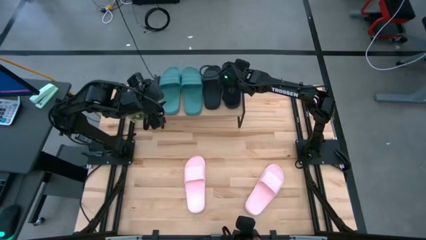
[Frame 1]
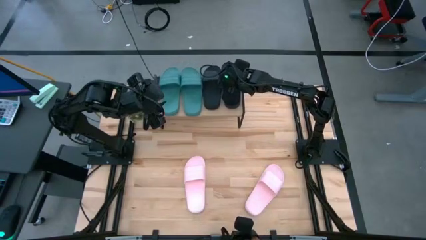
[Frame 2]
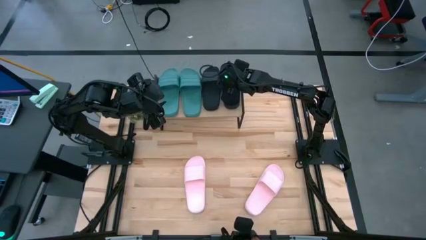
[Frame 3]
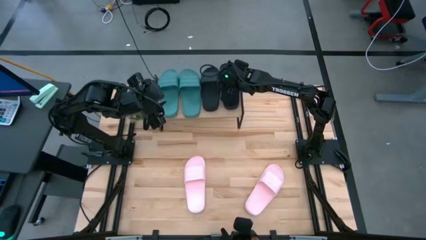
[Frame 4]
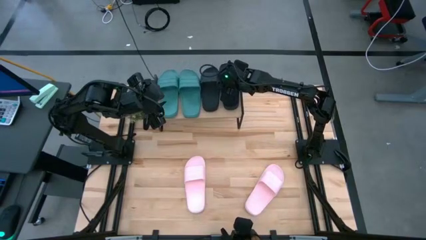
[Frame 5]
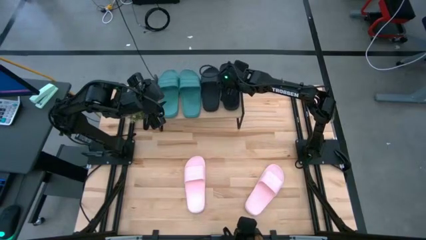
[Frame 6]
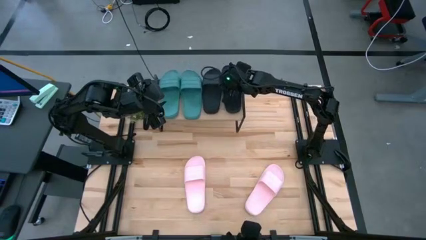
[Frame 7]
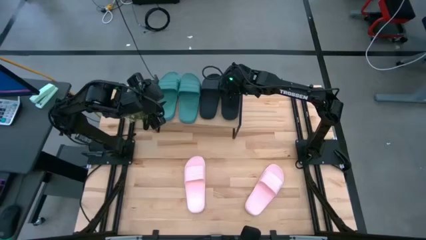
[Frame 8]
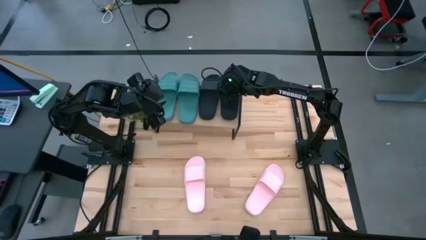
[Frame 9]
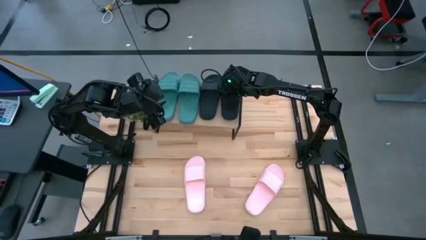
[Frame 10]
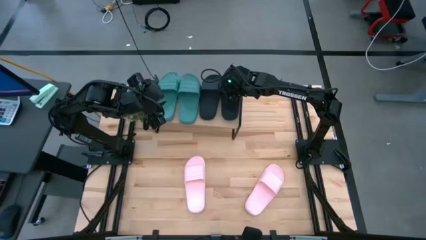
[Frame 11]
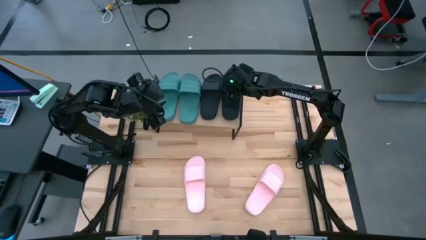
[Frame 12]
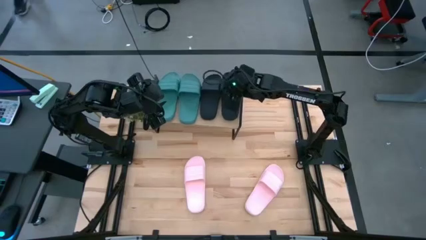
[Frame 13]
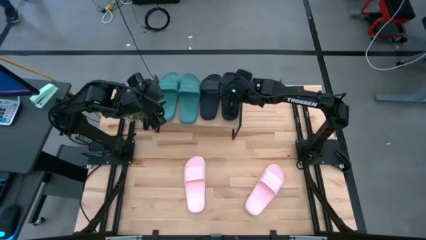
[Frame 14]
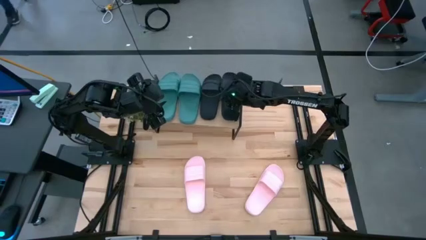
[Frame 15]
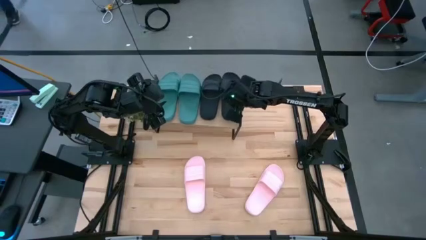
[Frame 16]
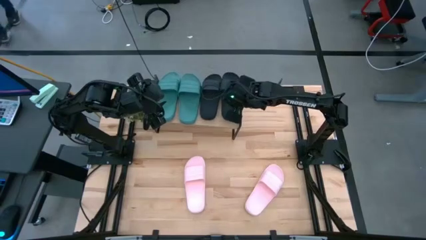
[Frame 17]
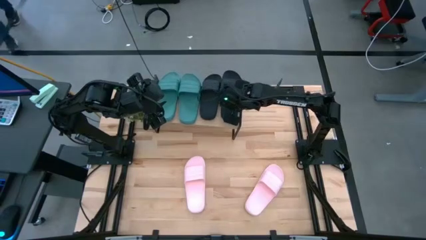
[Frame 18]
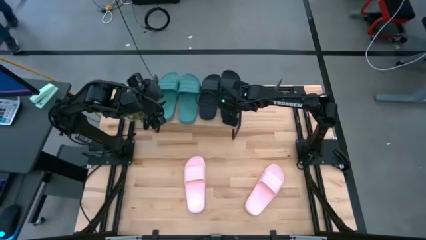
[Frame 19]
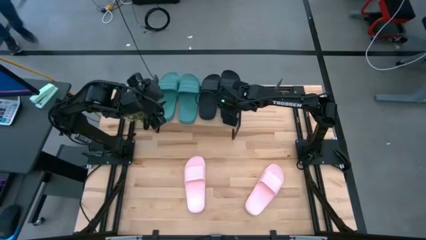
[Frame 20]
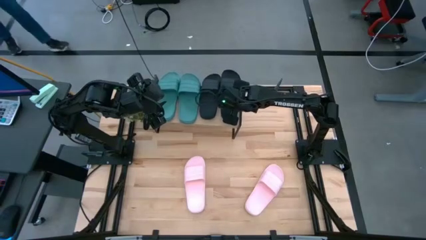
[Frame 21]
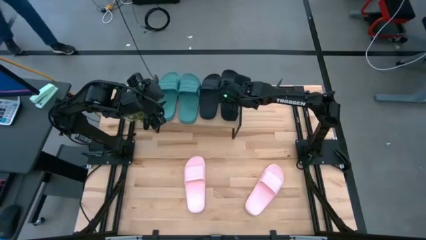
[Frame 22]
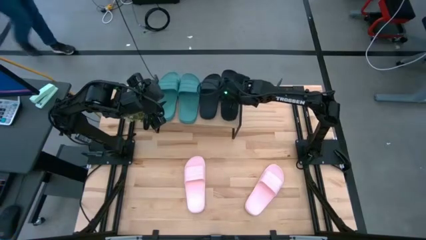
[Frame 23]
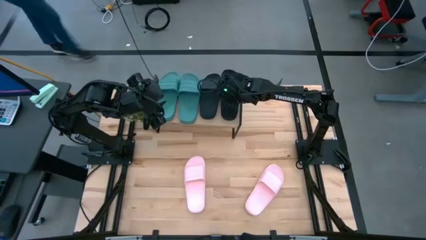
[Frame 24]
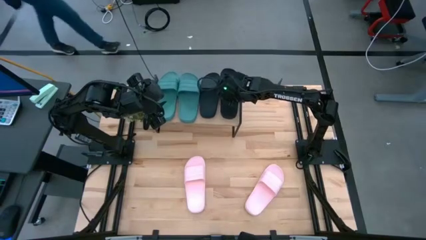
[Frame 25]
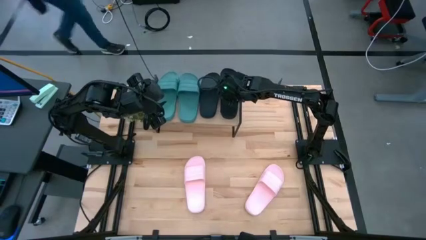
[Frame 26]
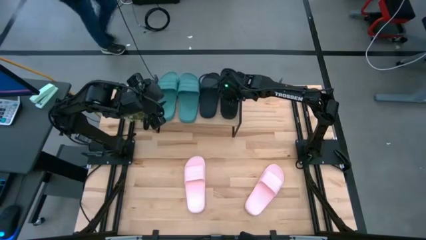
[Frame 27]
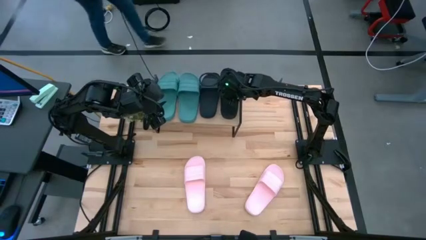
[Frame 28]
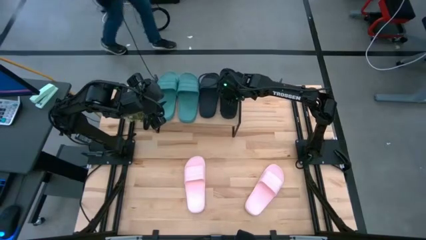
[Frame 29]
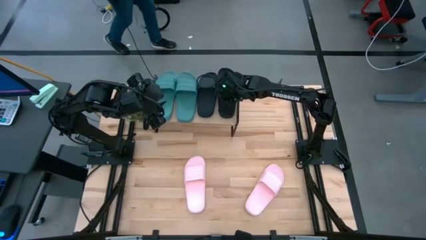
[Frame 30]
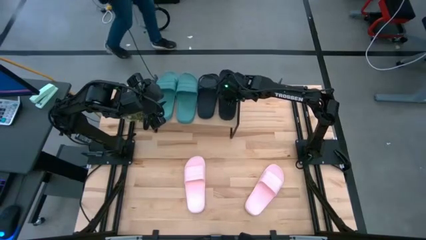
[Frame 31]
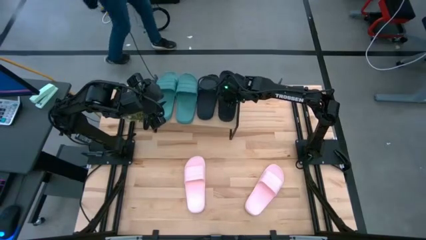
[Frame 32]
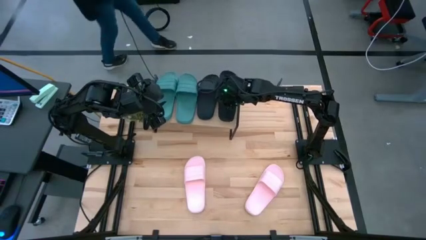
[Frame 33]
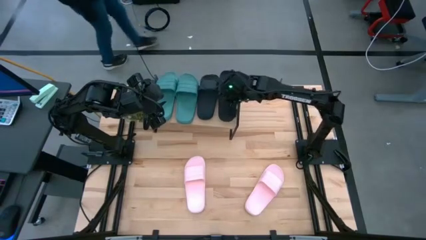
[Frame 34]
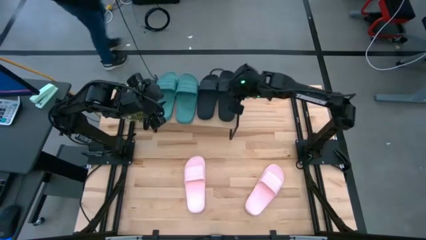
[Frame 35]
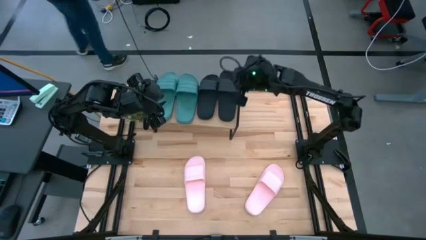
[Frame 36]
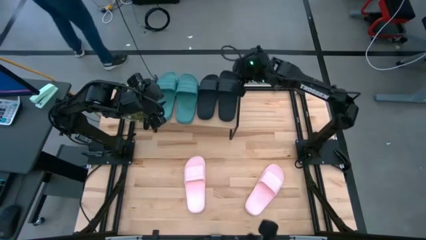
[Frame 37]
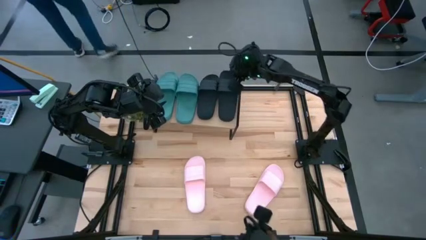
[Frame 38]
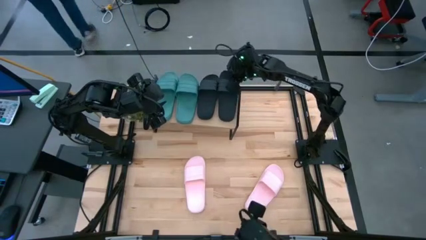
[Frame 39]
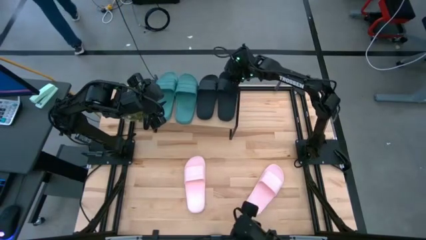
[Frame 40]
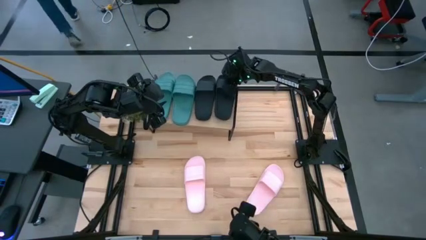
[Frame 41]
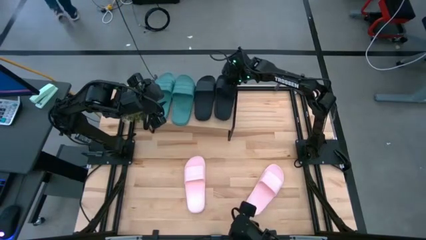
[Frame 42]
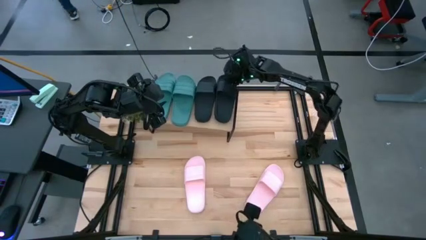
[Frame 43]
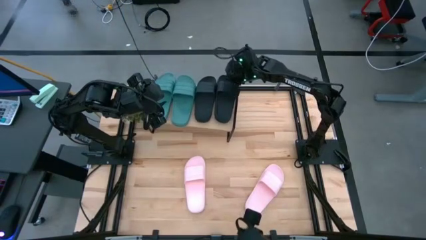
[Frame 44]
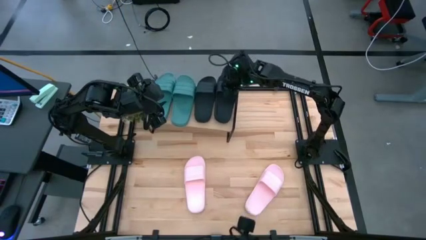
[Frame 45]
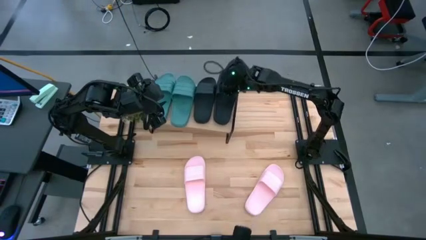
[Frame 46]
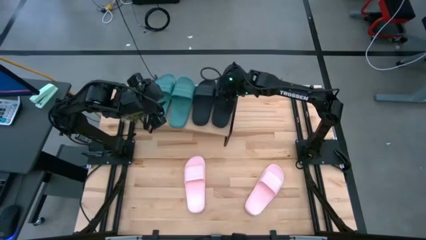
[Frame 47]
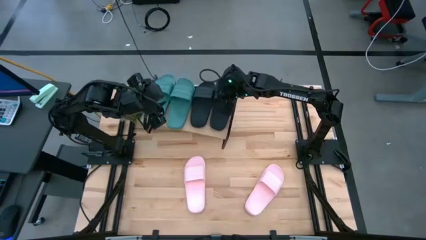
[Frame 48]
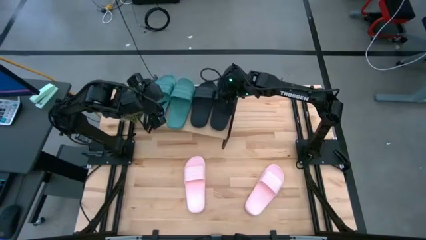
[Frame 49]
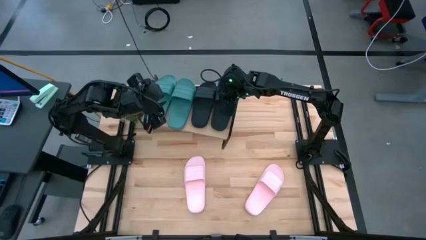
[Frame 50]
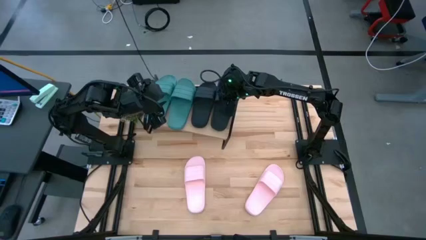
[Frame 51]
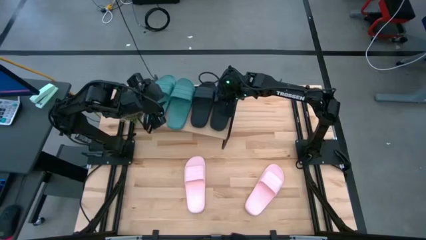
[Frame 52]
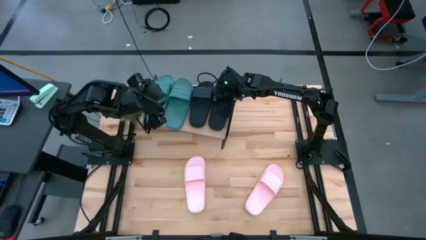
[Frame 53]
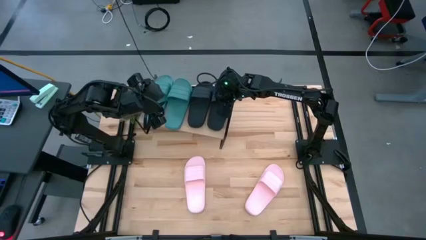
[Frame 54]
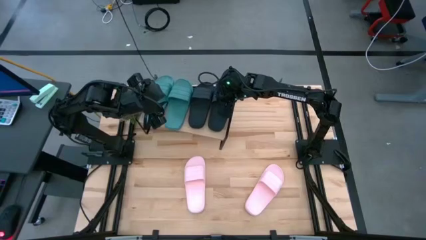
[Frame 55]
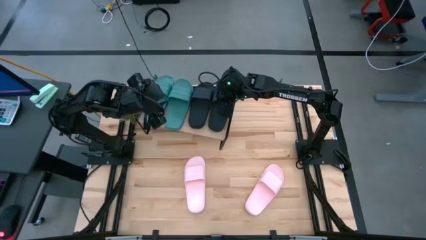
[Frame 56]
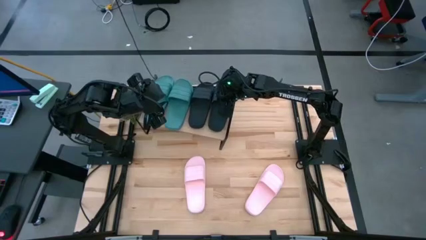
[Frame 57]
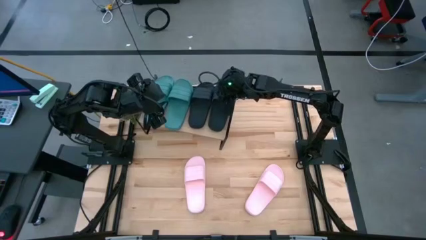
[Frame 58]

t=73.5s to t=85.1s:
Task: Pick and place slides into the shelf
Put the black slide on the shelf

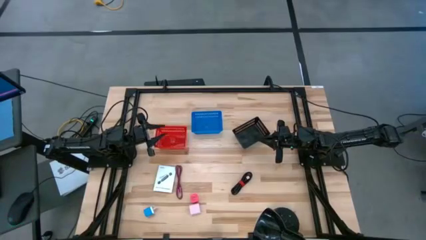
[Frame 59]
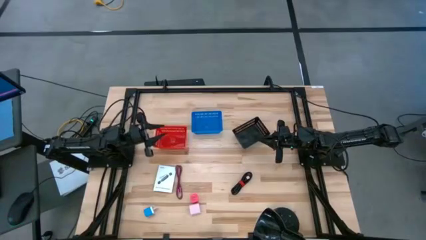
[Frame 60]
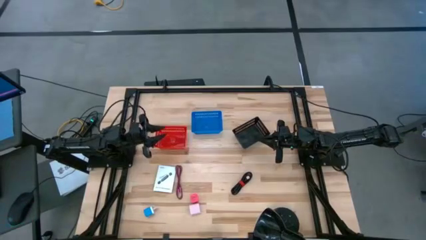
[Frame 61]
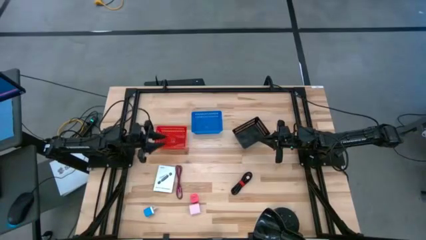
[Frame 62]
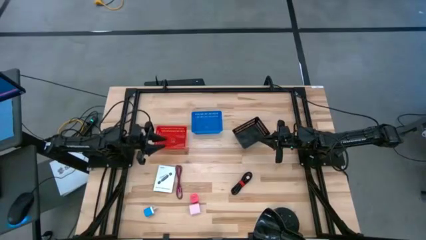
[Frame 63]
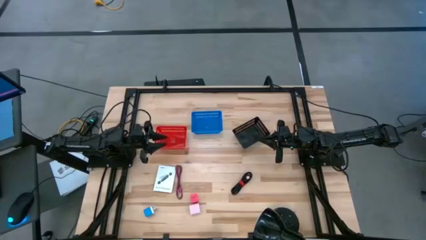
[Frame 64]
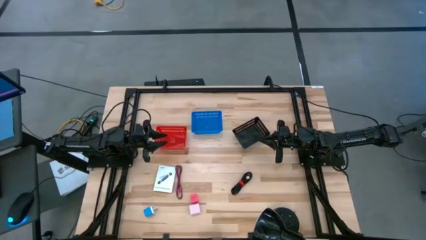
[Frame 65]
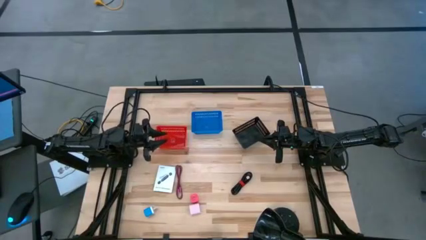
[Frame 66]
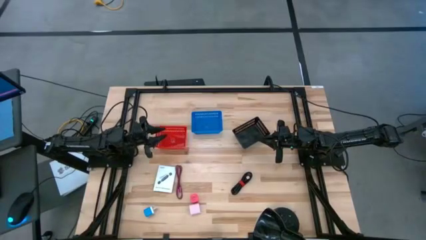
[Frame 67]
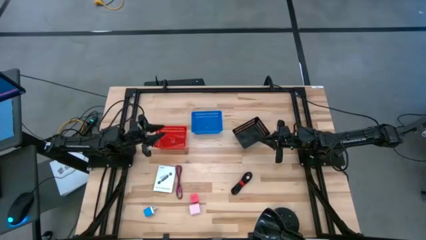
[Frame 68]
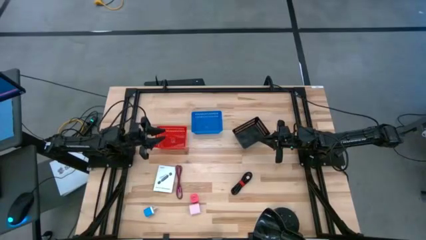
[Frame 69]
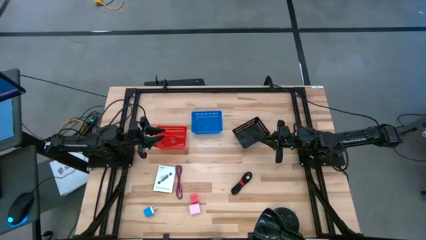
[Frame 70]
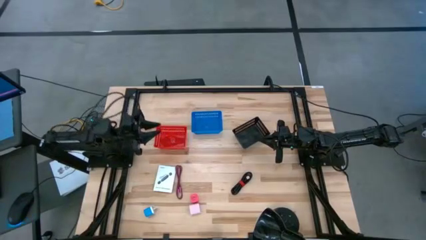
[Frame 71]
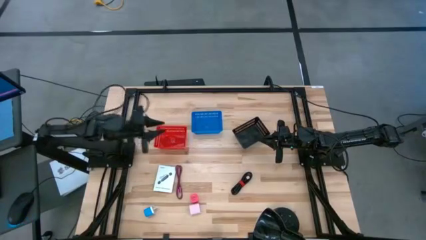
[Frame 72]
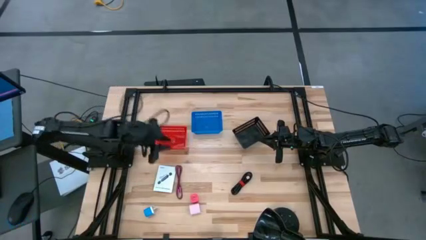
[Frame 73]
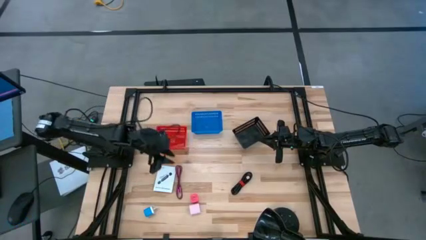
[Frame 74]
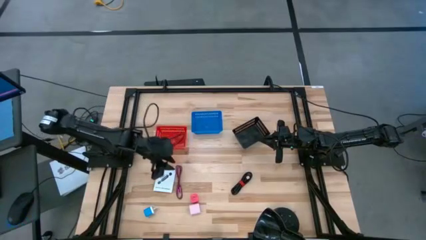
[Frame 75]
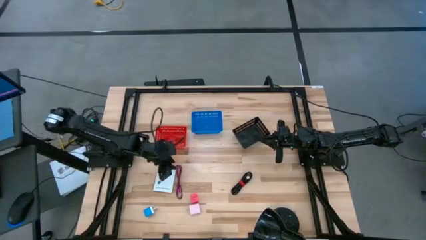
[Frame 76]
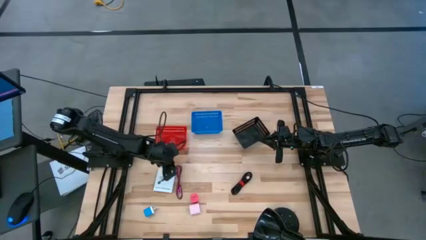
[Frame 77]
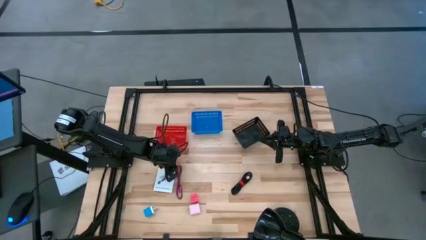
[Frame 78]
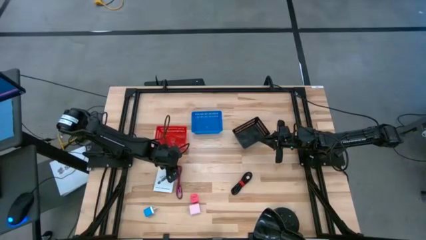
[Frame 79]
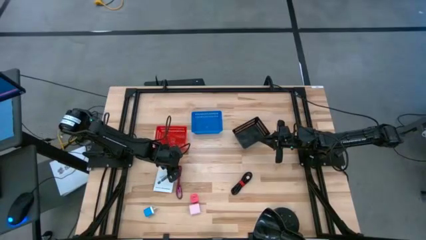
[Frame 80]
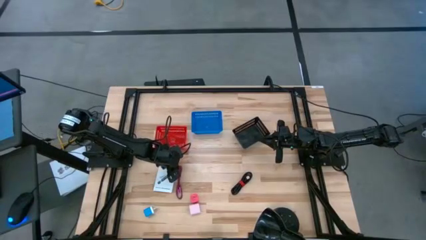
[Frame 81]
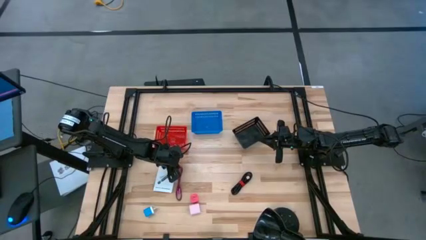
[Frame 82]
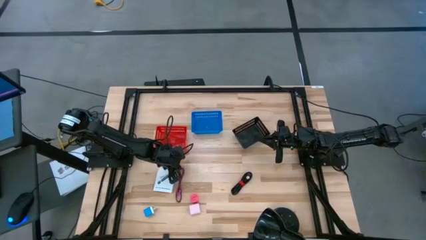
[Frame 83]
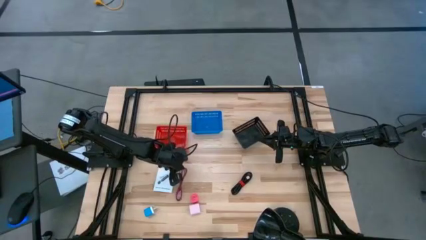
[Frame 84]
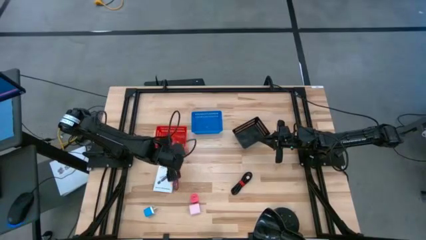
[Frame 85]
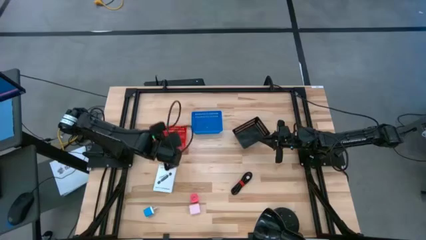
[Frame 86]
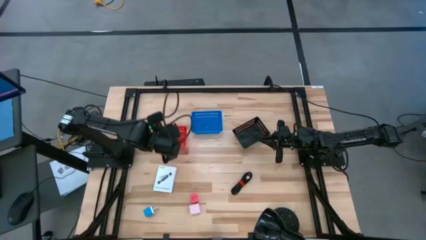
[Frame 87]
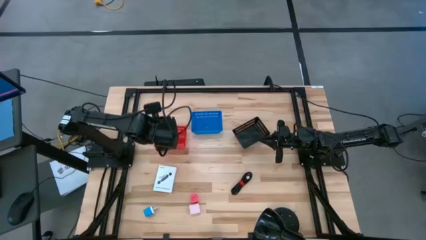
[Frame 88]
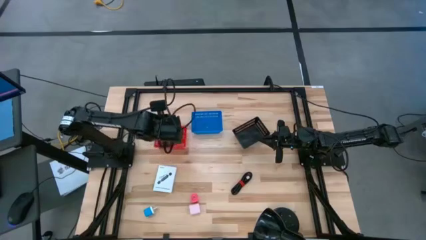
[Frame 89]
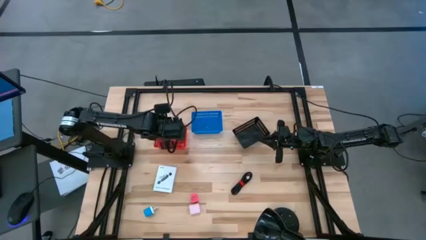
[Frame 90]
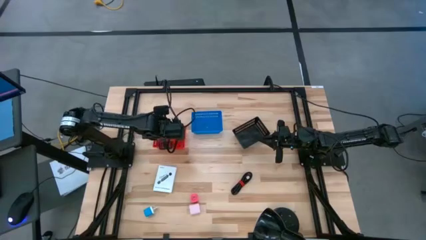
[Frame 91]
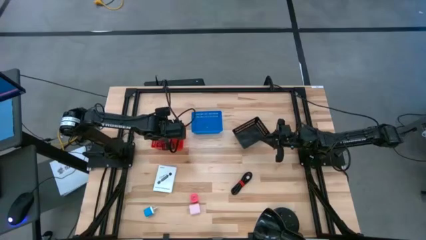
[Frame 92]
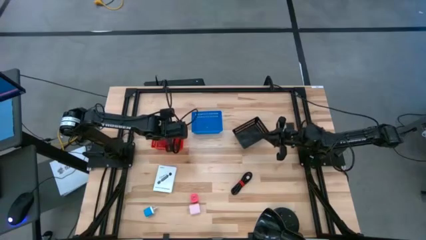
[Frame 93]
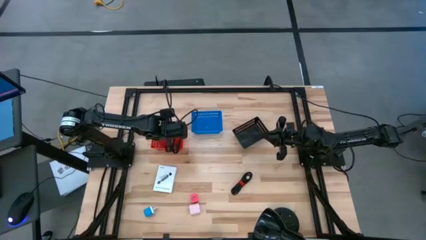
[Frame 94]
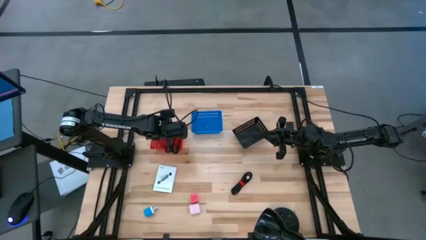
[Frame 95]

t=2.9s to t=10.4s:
Task: Pick and place items into bin
Put the red usb charger cable into the red bin
